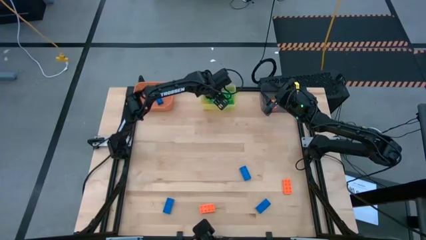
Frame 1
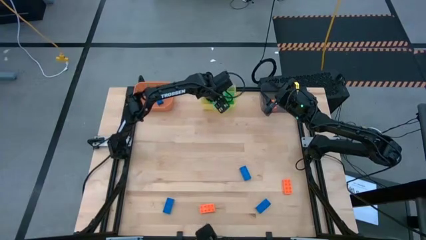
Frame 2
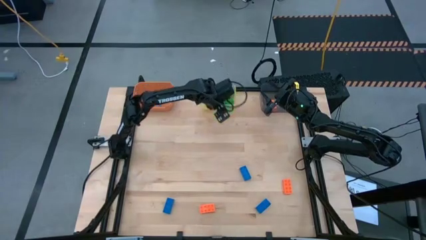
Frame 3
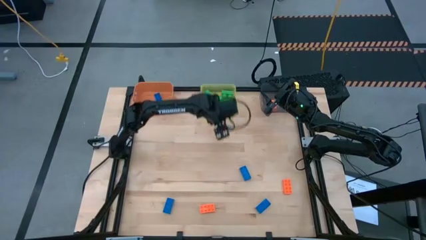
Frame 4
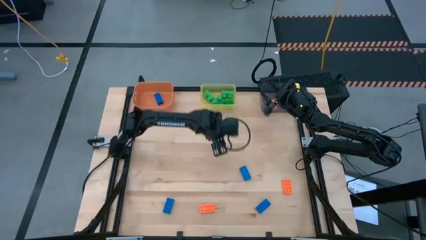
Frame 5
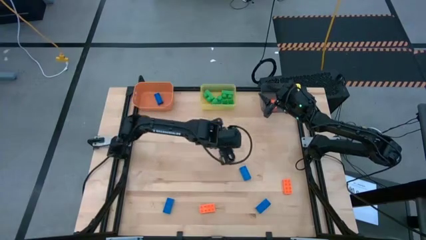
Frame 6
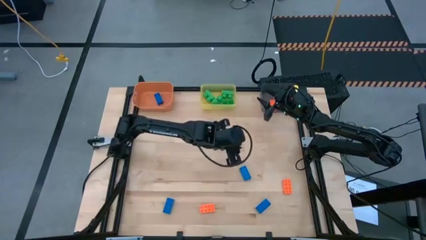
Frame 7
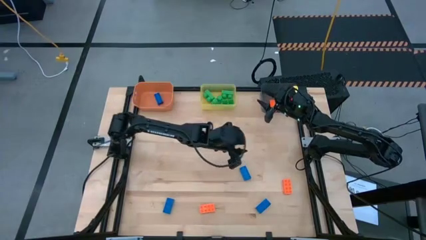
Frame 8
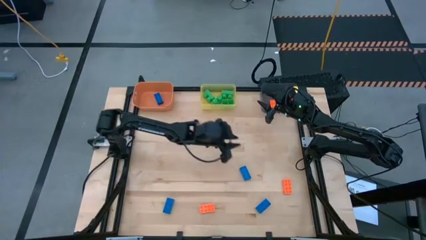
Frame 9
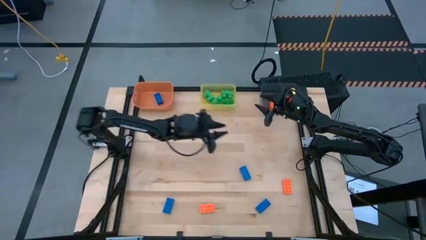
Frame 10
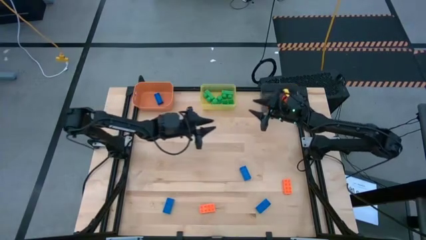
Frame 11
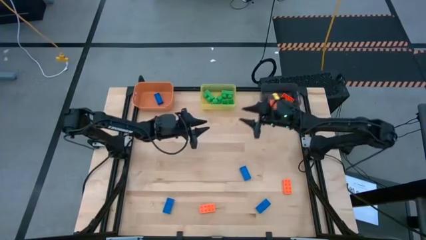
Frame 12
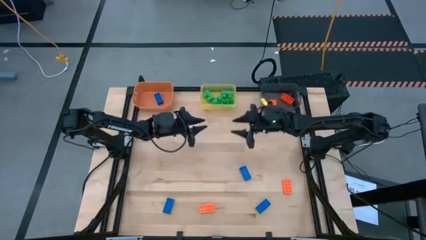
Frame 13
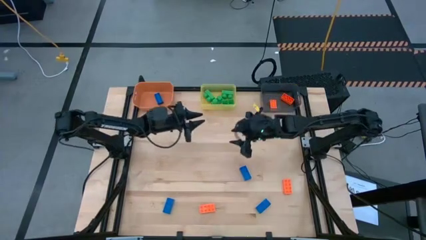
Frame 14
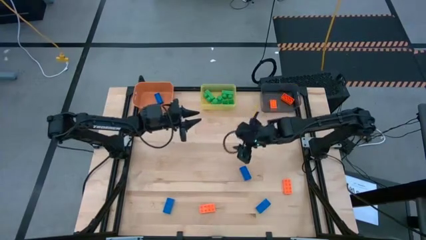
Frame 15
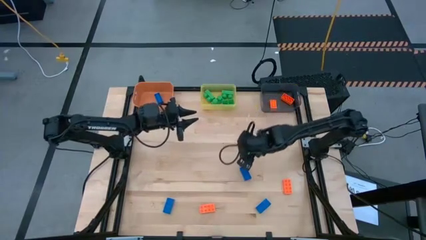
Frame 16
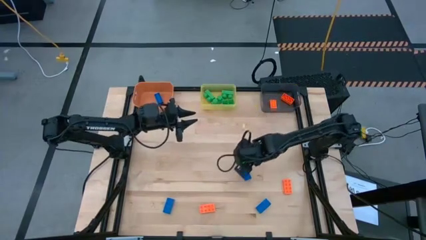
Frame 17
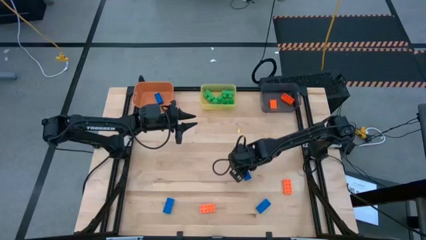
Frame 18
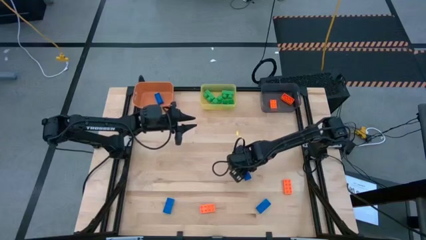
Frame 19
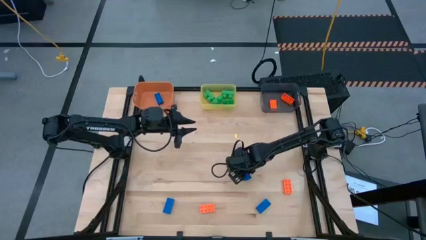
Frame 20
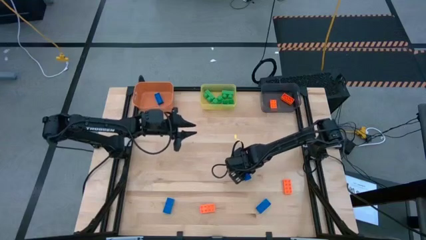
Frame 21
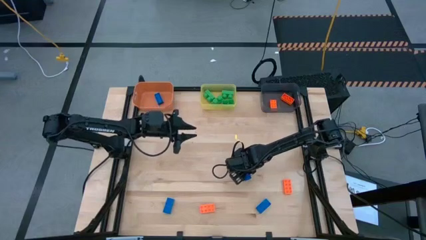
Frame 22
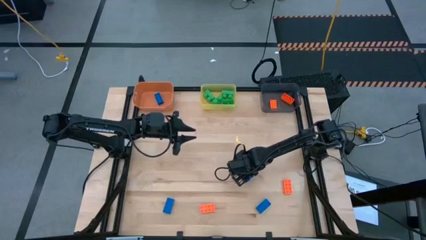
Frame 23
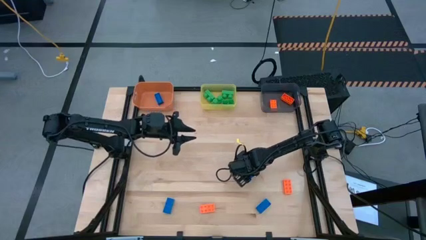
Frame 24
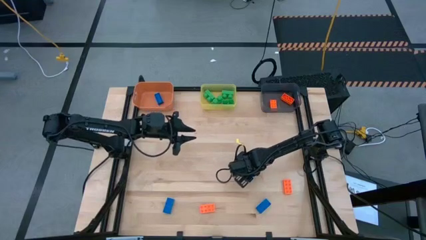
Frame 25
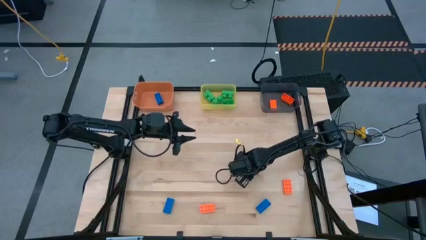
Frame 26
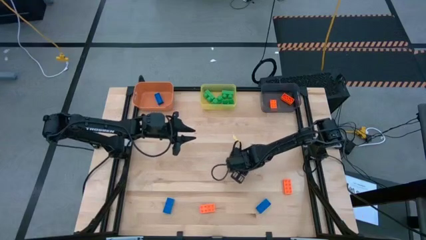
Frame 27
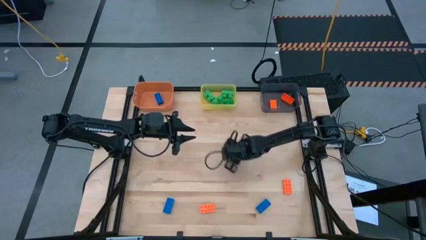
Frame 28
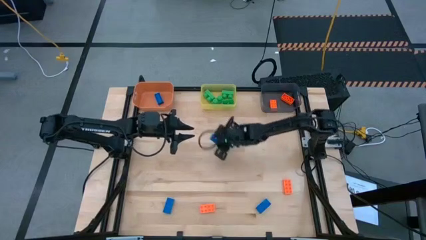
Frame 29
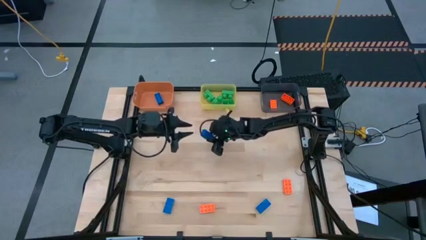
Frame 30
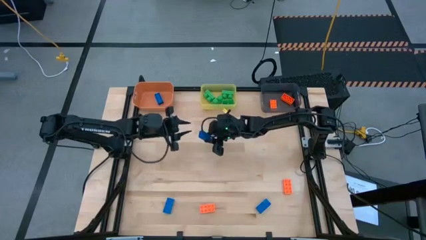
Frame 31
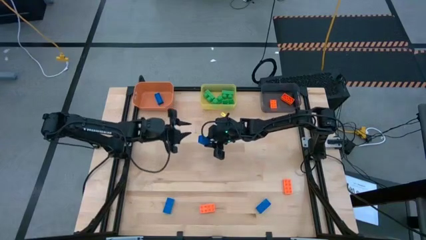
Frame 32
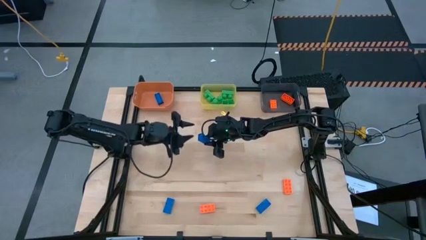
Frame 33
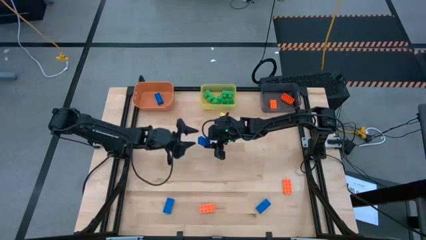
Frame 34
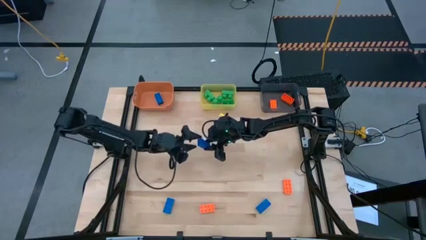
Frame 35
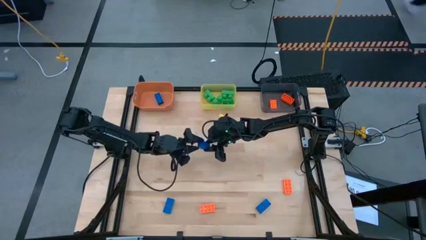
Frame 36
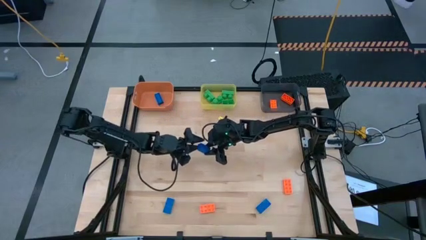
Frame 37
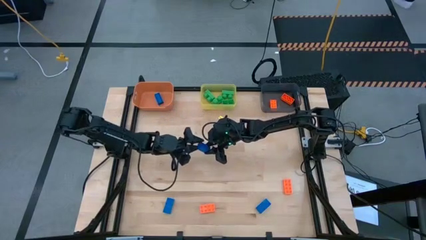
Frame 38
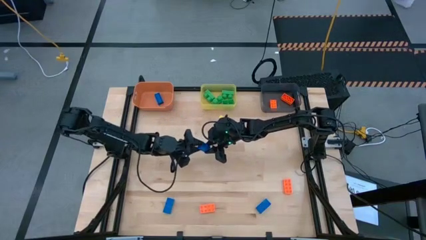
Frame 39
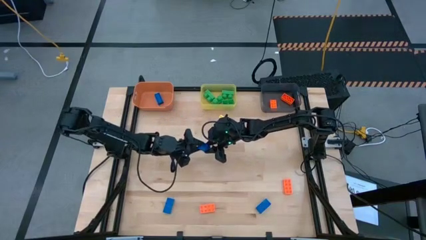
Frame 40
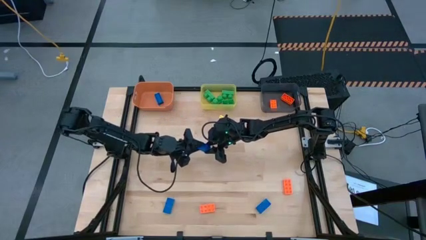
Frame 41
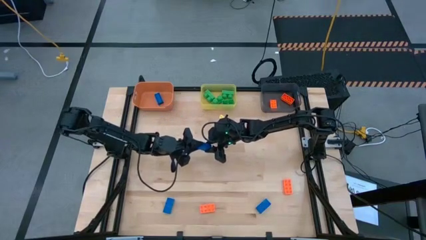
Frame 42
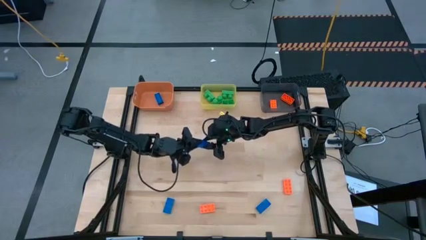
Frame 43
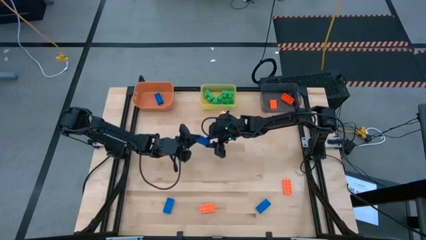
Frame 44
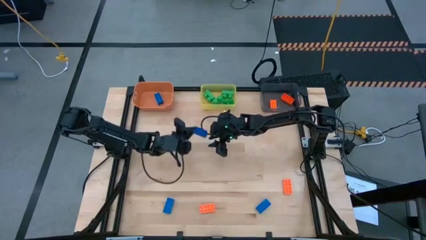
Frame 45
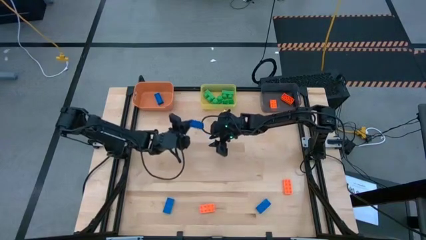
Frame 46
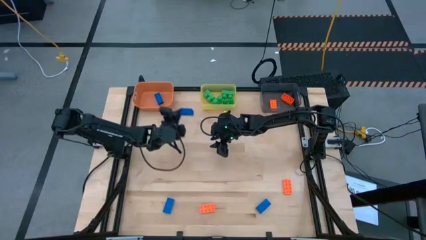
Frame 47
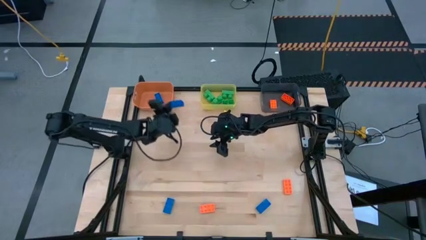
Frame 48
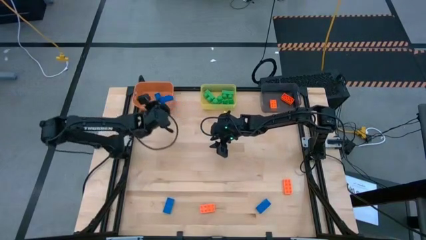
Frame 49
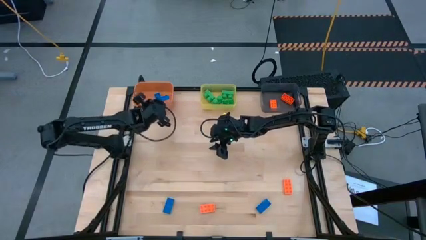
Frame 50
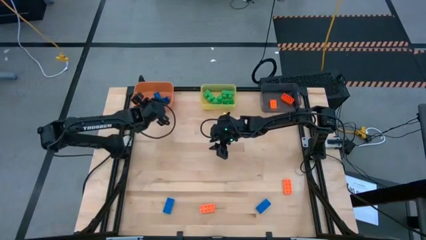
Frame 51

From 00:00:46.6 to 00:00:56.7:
Task: Sort & place blocks by color
Put the blue game piece into the orange bin

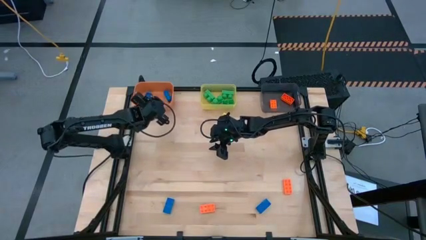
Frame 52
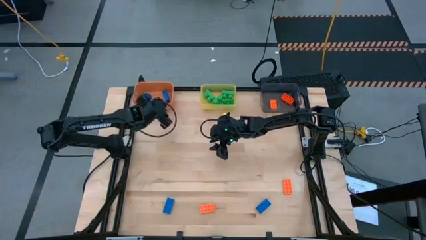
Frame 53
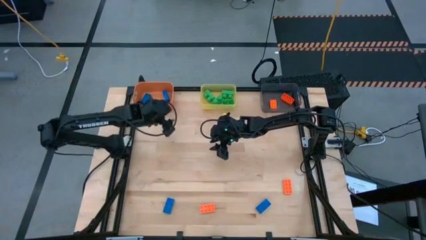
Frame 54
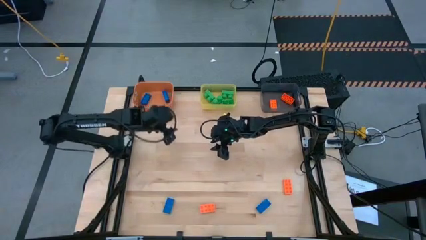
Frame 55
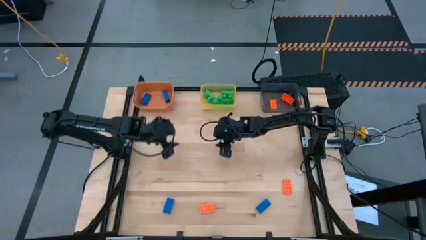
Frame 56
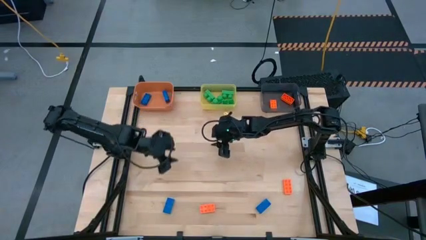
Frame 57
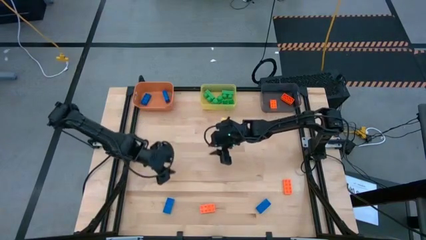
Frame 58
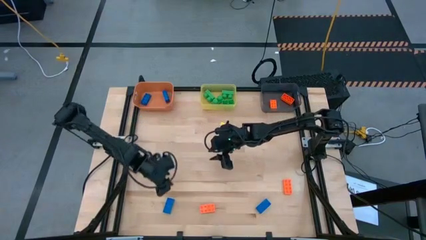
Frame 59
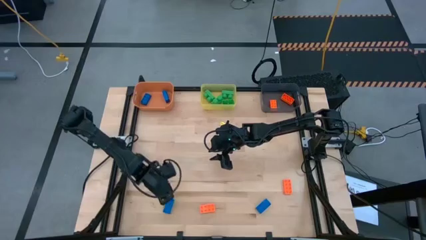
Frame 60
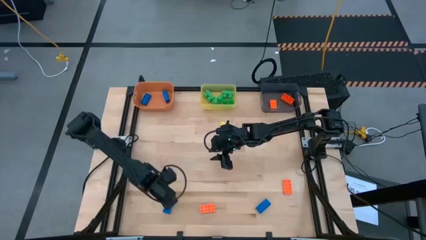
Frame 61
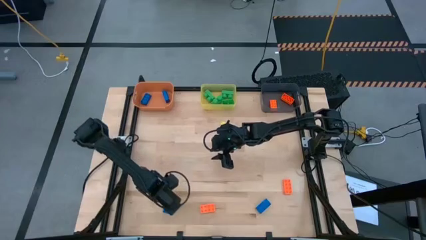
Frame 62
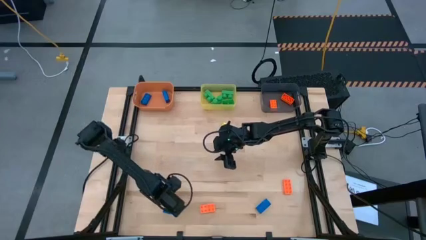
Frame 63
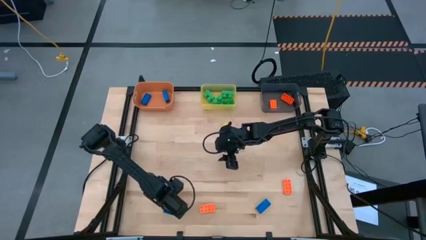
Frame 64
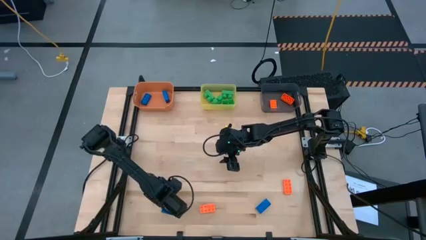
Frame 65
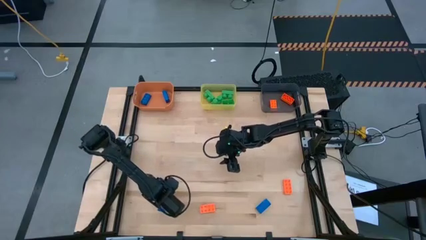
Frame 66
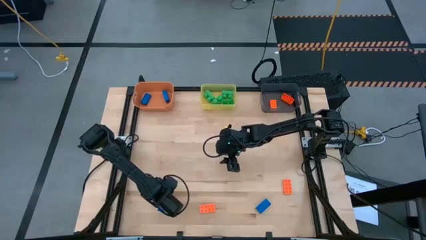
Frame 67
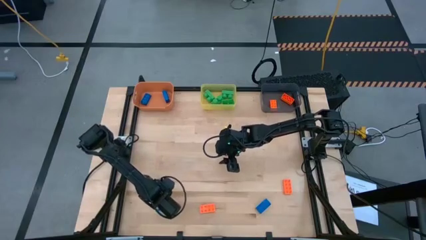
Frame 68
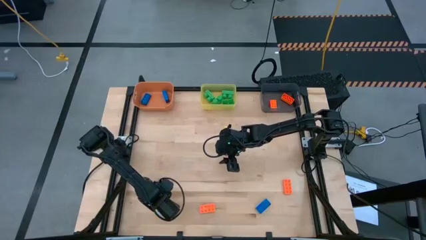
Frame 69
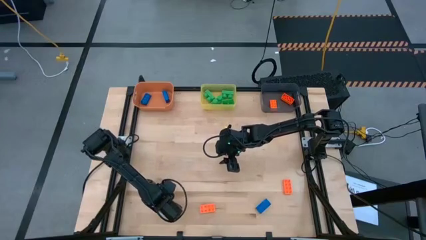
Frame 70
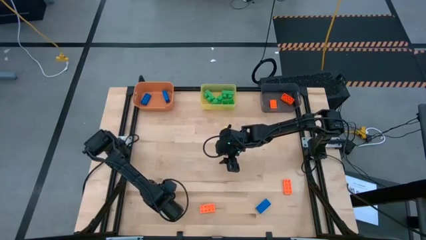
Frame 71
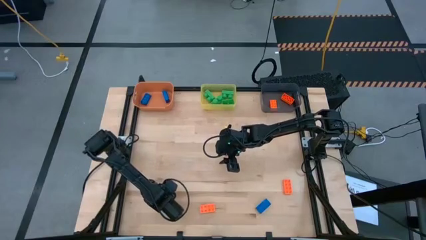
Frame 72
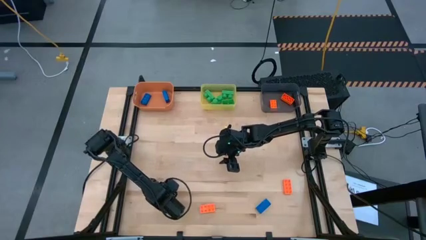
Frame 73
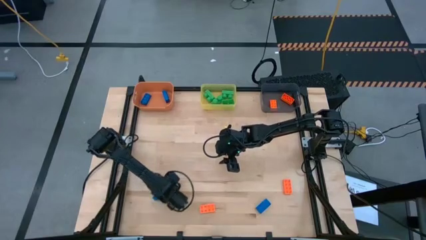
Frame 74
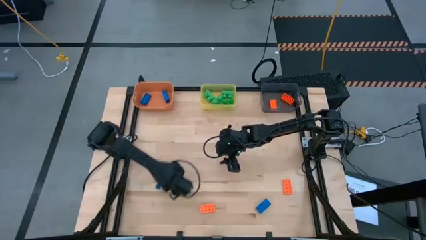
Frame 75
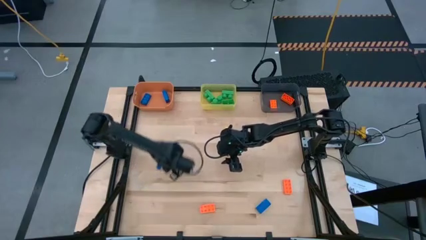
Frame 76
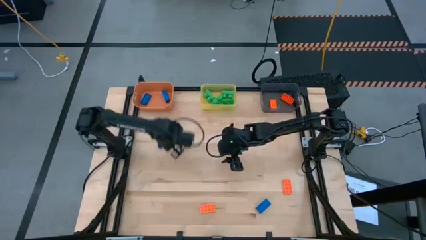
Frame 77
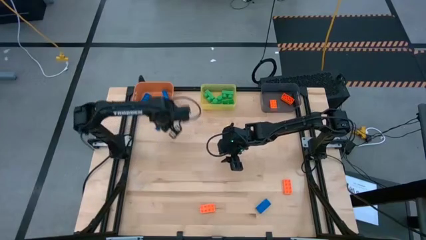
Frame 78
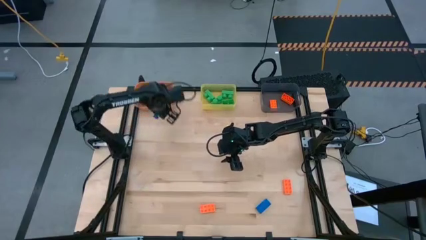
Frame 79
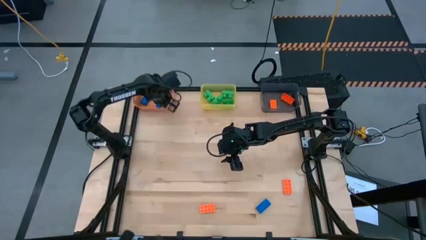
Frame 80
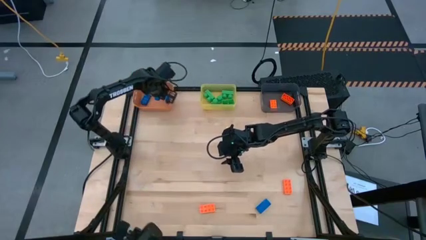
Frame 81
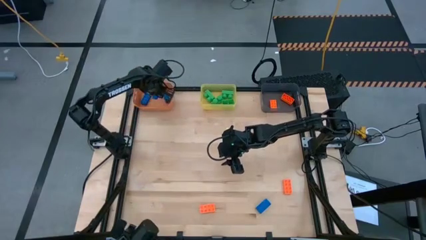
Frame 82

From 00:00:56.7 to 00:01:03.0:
Put the blue game piece into the orange bin
